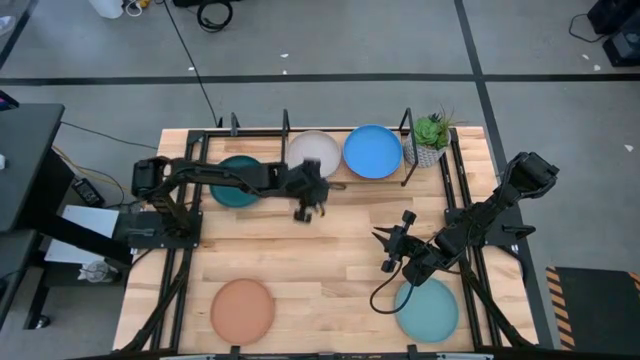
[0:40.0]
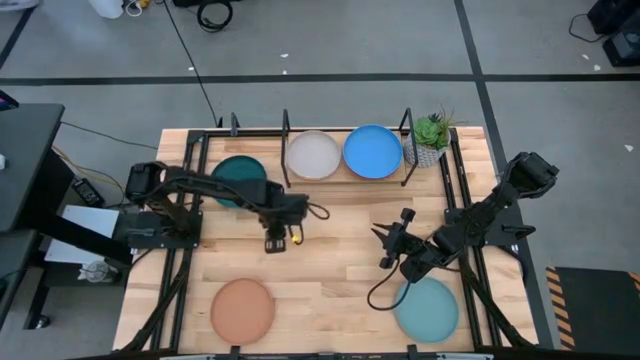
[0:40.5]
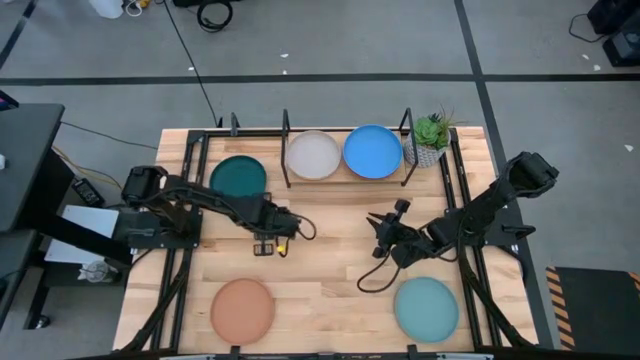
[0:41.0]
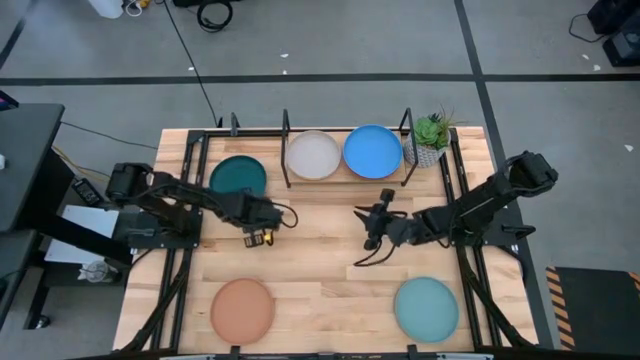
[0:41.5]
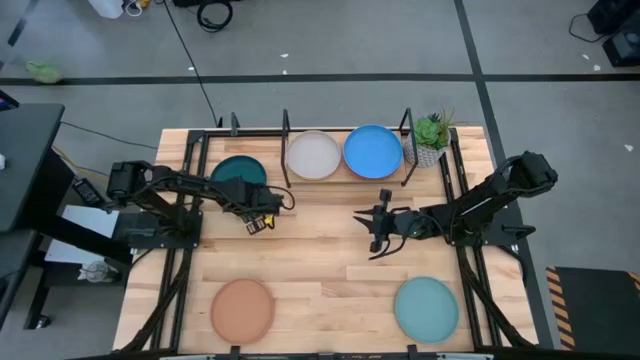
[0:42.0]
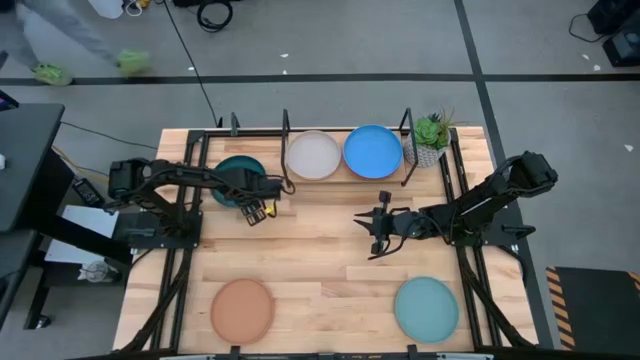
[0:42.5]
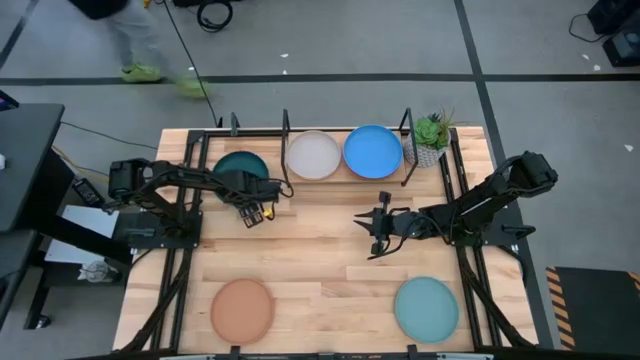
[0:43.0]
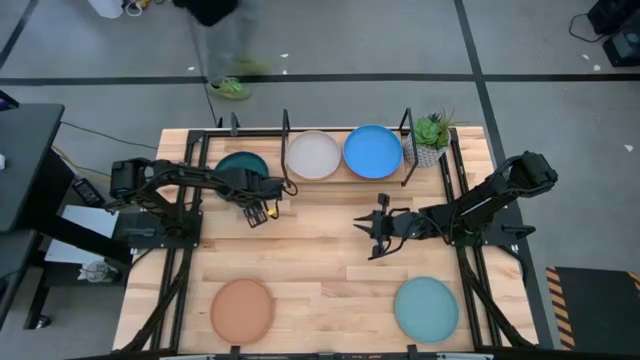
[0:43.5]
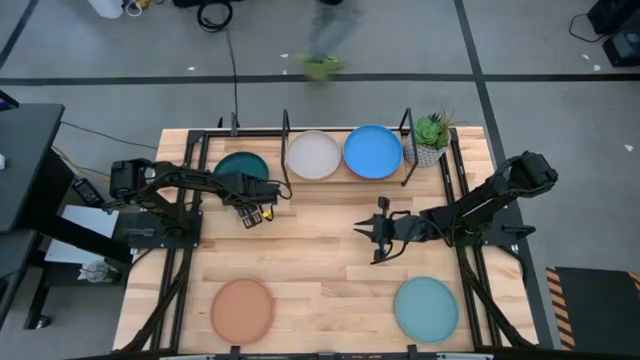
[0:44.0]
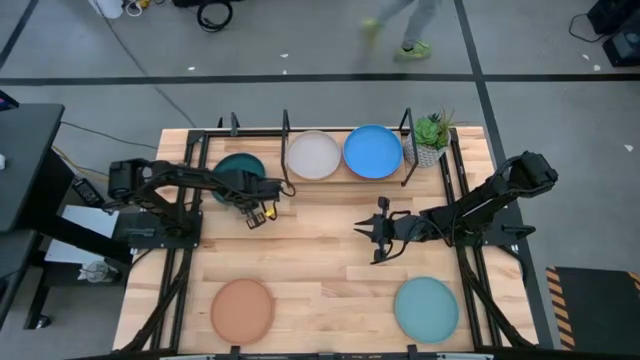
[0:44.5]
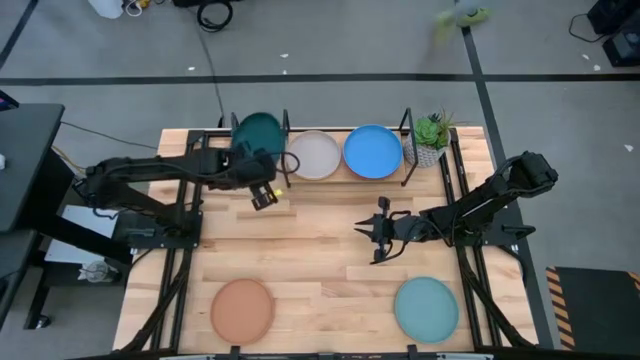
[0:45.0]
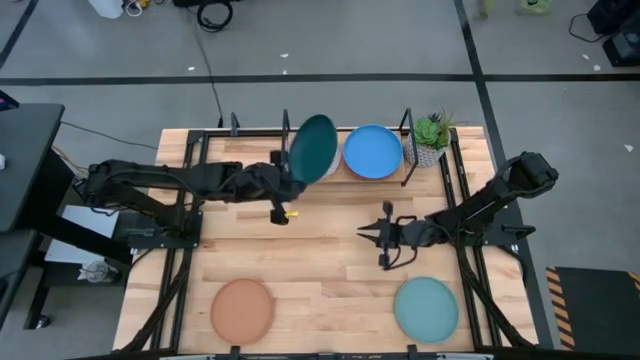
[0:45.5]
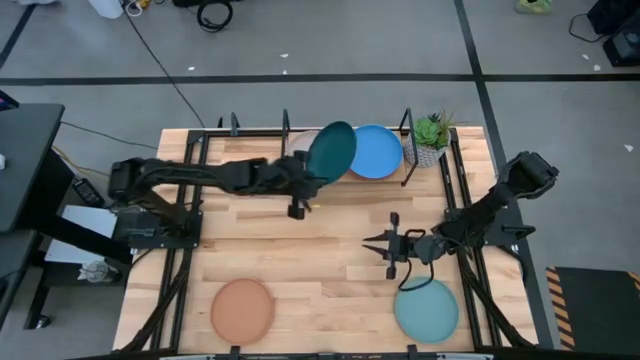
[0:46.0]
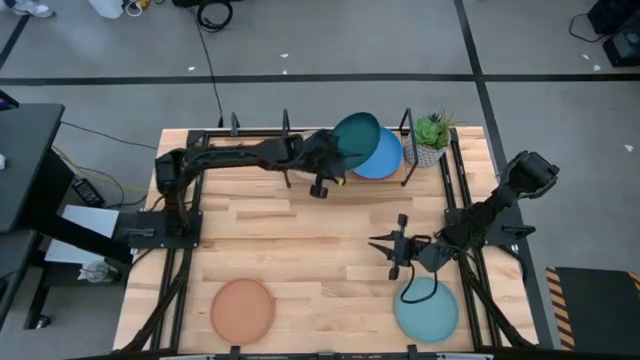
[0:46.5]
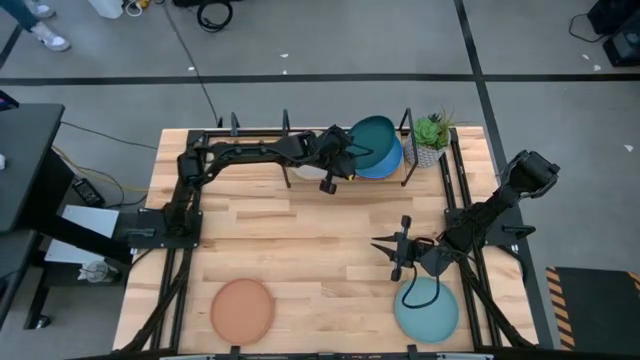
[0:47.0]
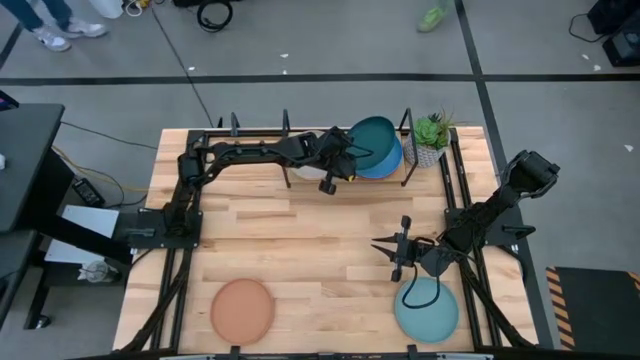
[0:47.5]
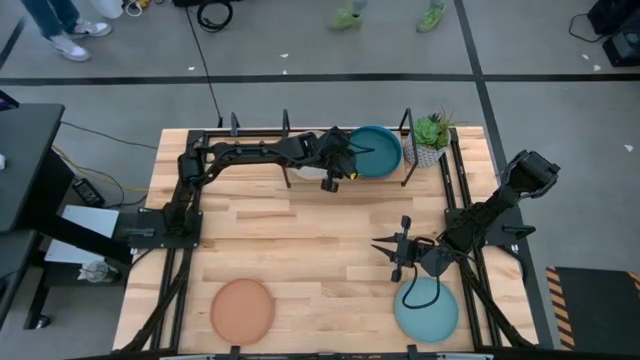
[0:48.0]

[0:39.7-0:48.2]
Task: Place and stack plates onto a shelf
Stack the green plate on the blue plate on the shelf

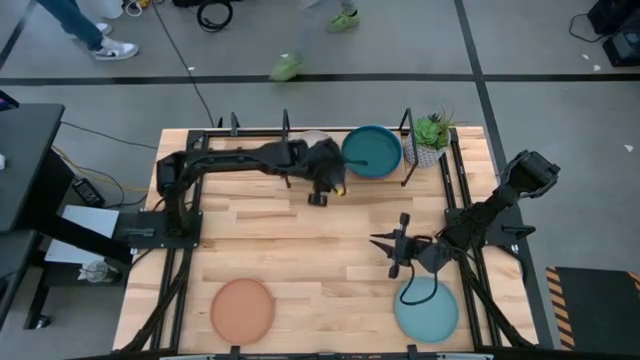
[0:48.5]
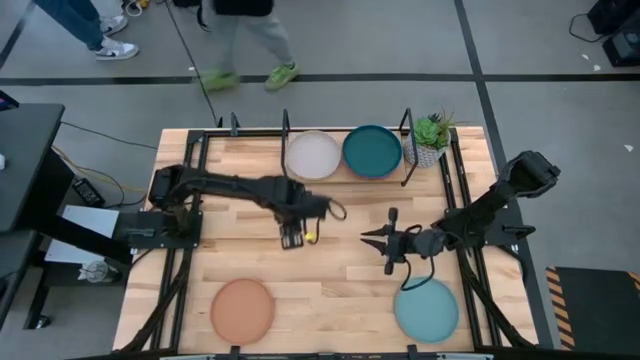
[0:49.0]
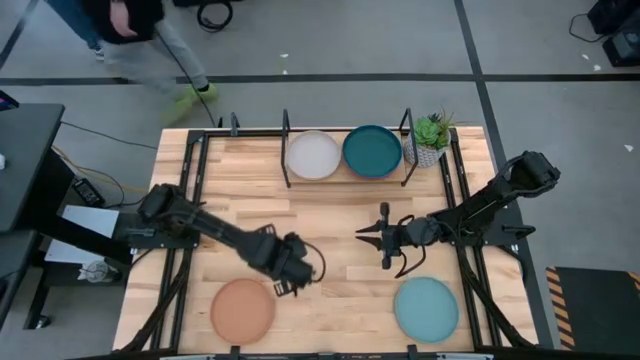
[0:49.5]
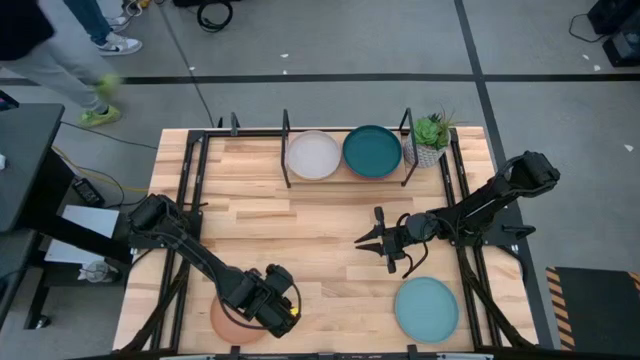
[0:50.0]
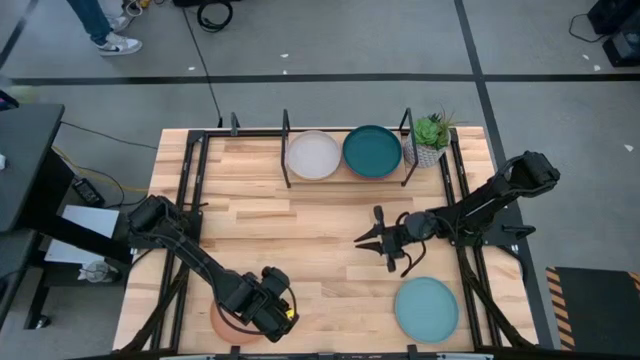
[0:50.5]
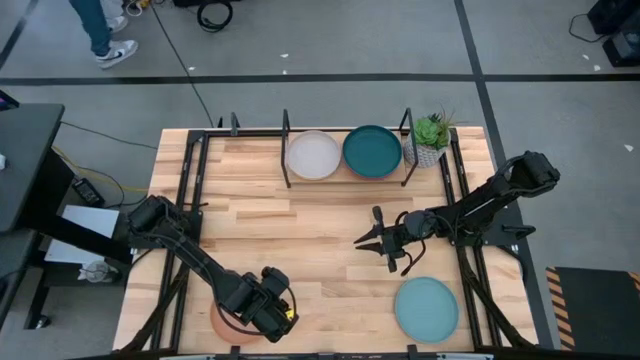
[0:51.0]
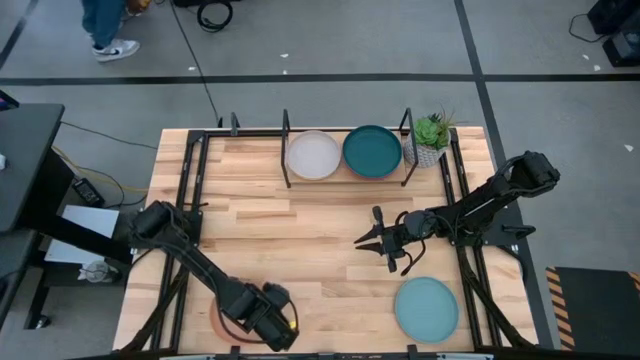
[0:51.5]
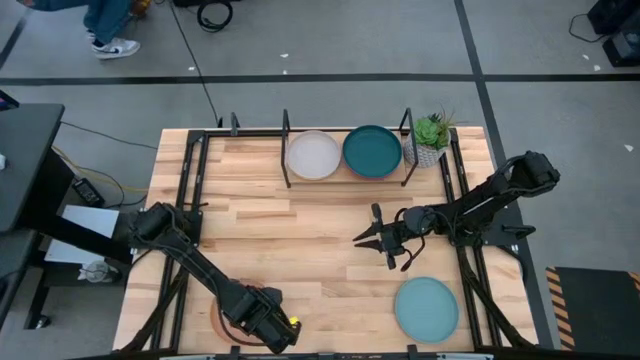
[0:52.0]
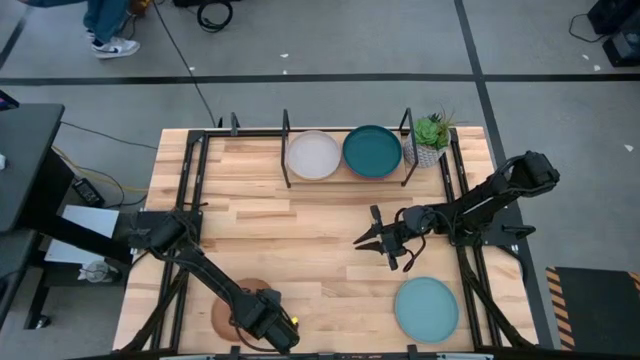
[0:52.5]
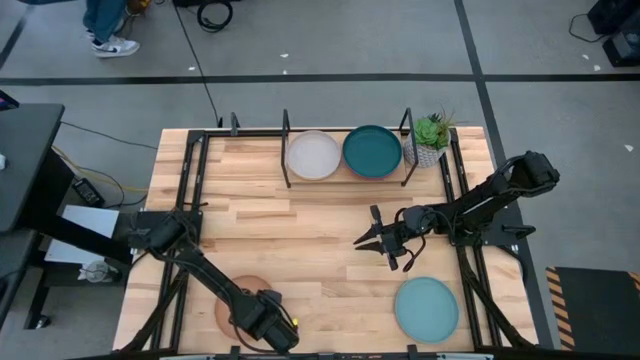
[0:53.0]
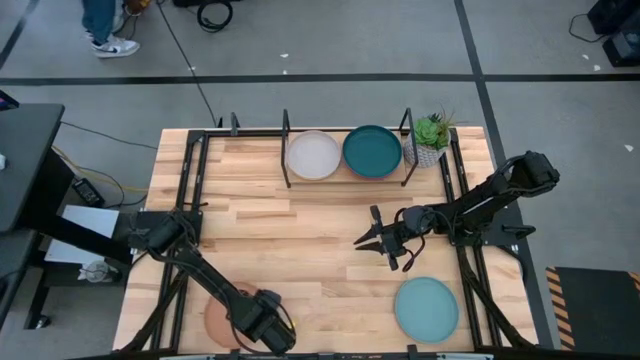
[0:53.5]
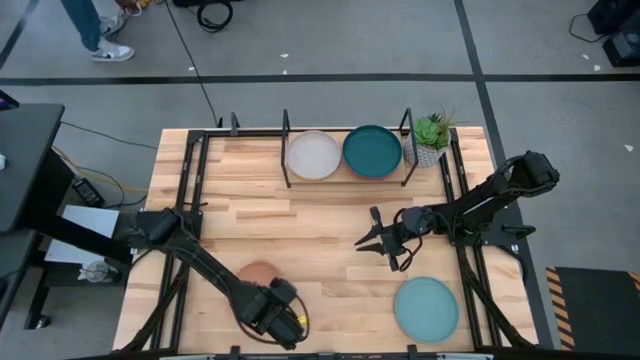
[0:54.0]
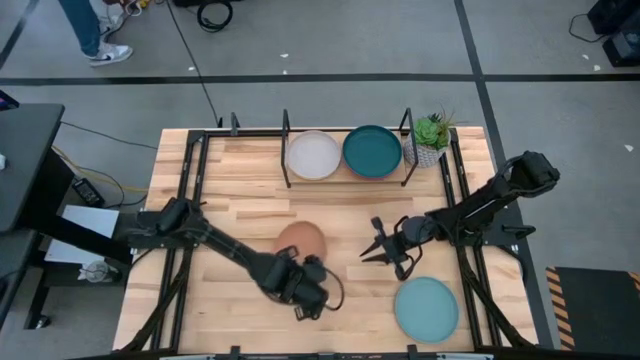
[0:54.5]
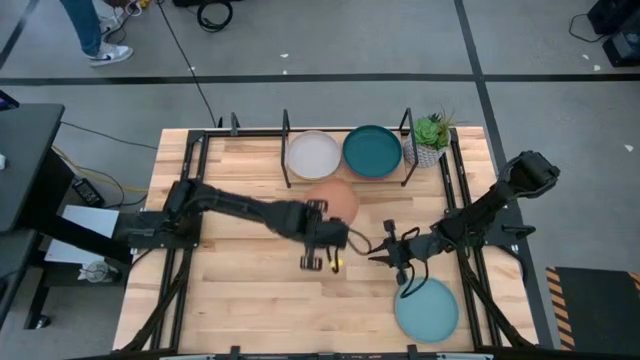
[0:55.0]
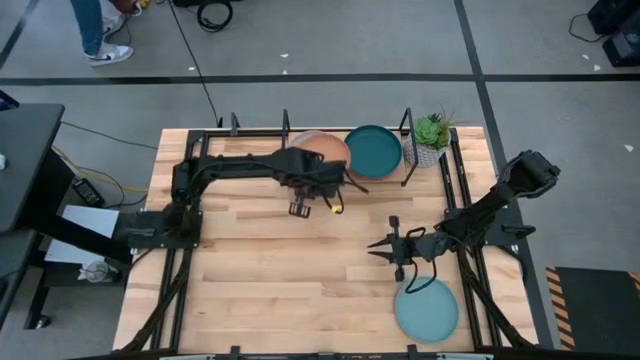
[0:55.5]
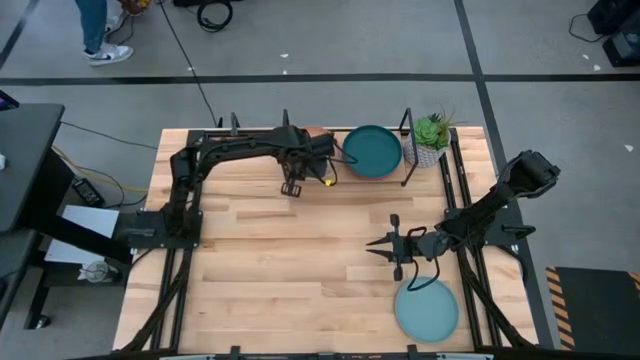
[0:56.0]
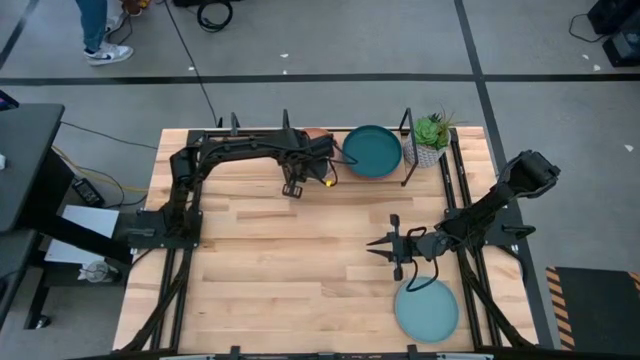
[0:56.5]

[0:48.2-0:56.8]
Stack the brown plate on the grey plate on the shelf

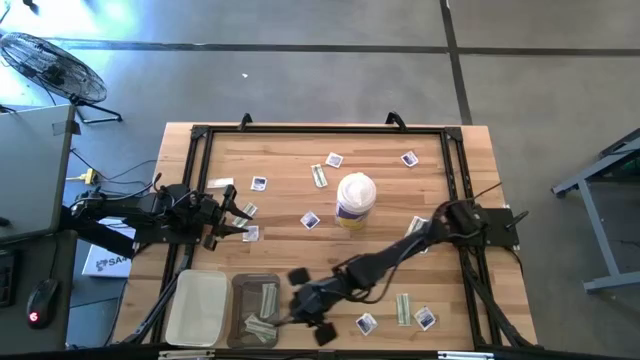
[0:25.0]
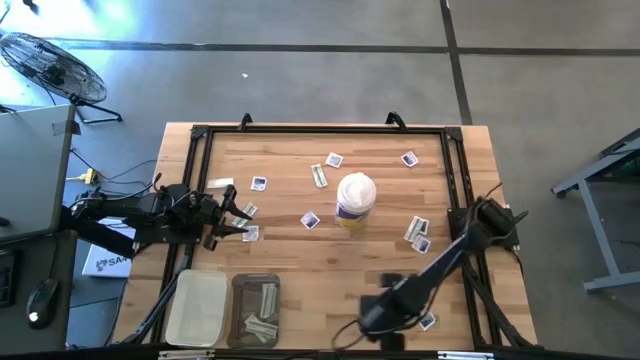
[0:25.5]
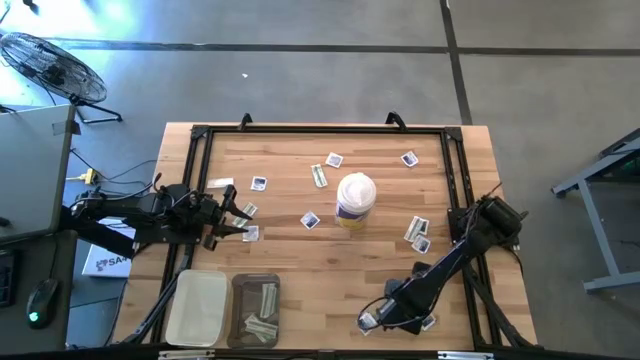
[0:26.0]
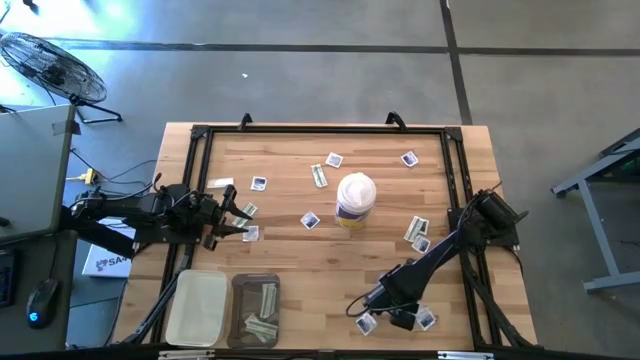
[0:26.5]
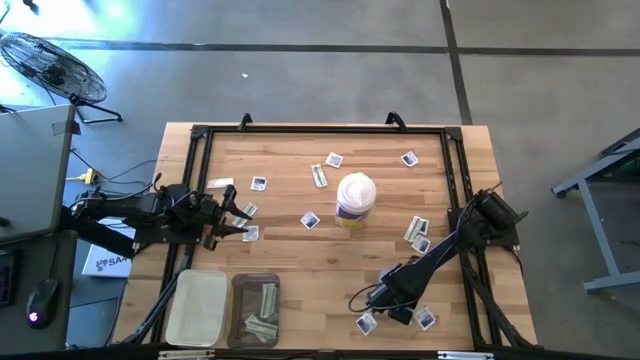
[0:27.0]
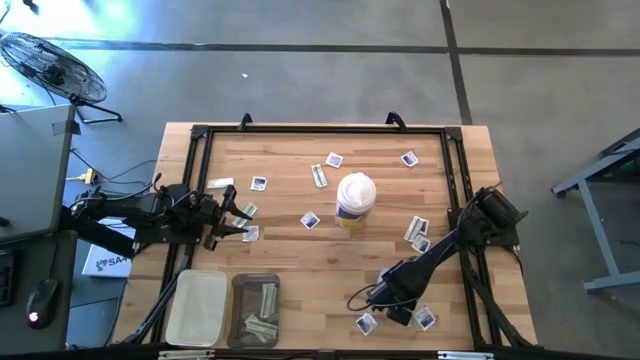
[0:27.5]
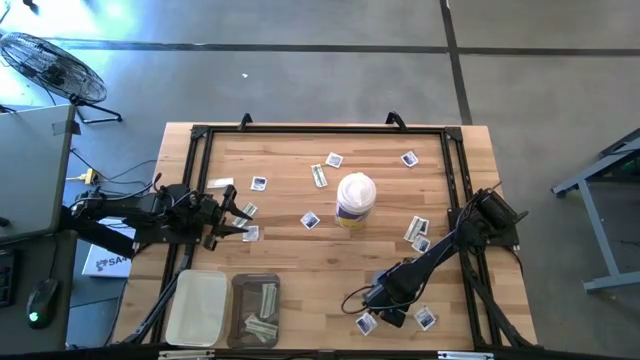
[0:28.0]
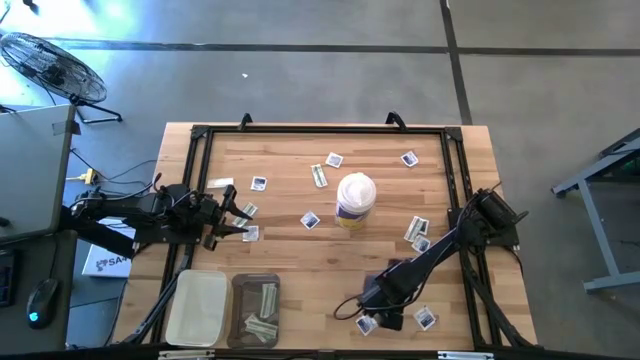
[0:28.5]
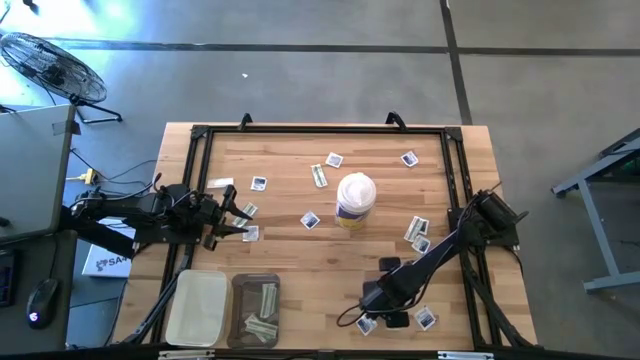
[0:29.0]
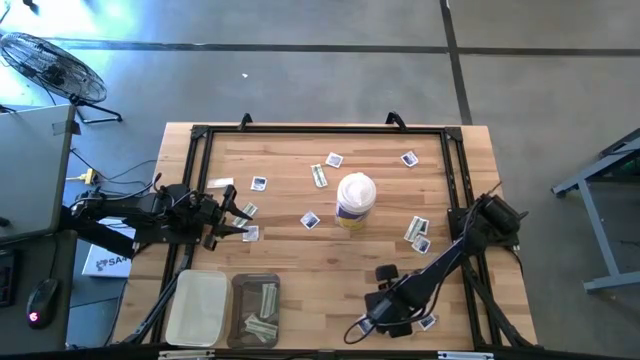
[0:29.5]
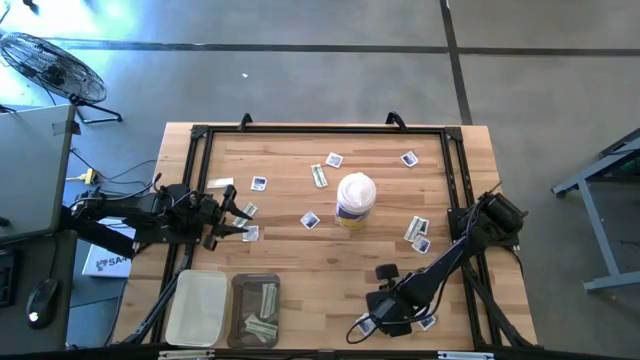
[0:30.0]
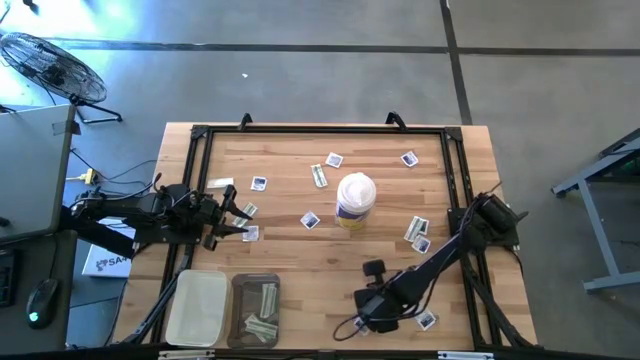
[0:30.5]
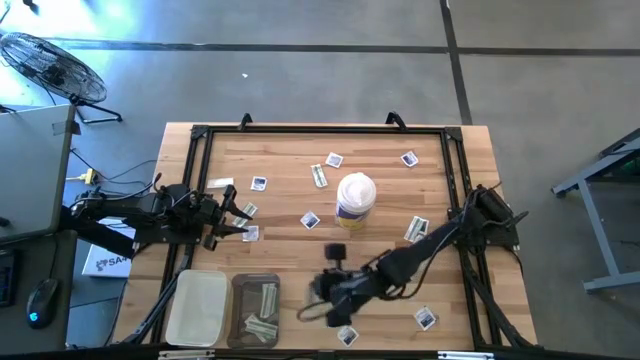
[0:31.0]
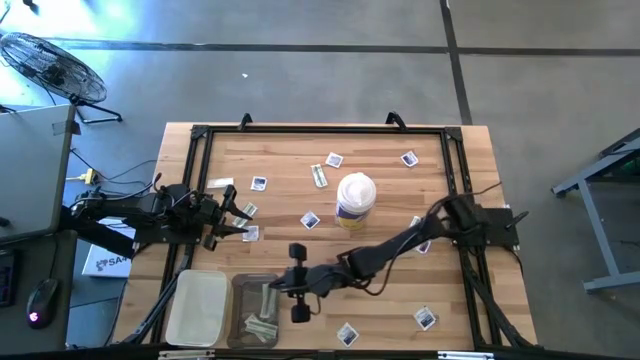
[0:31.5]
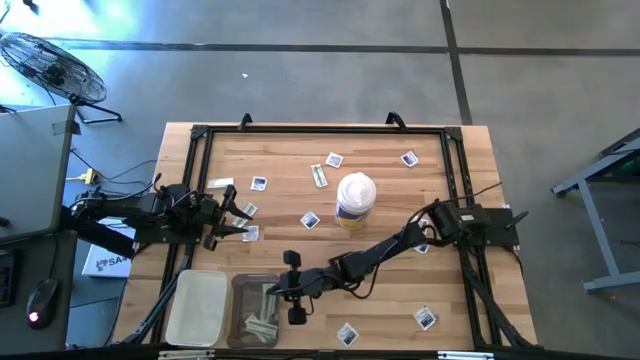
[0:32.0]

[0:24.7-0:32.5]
Task: Pick & Place First Aid Supplies
Put the bandage into the black transparent bin
